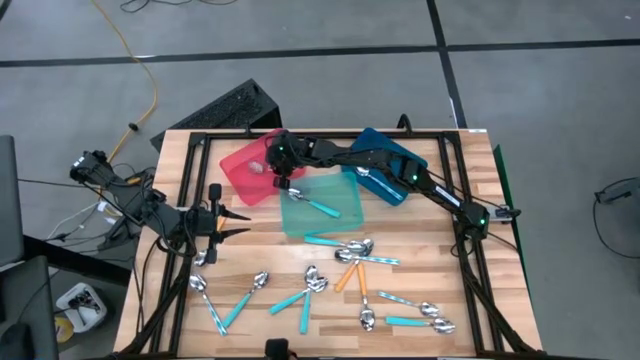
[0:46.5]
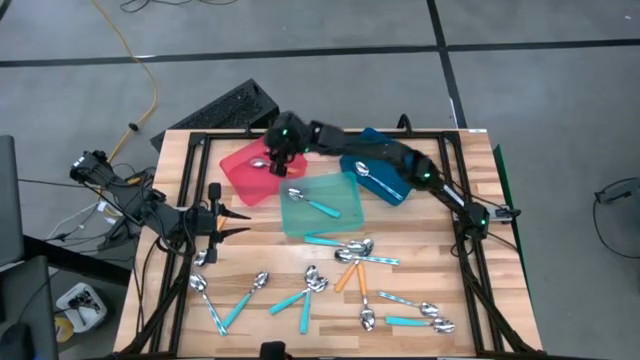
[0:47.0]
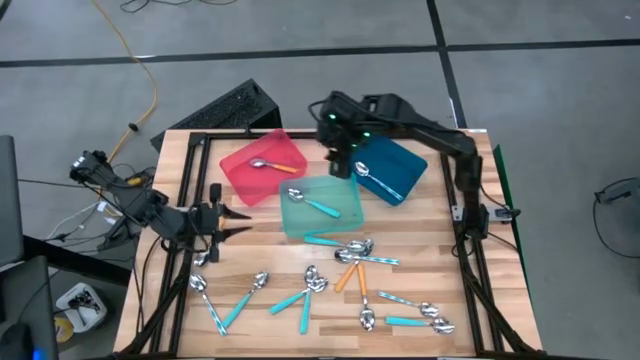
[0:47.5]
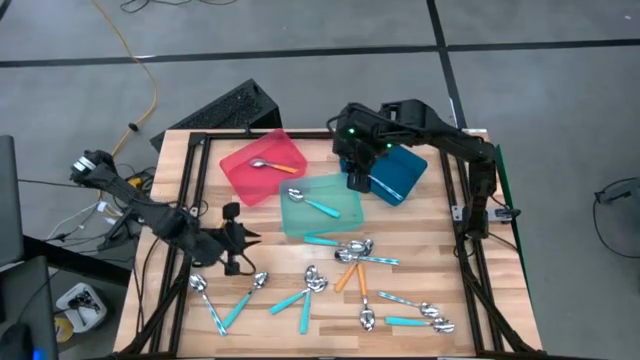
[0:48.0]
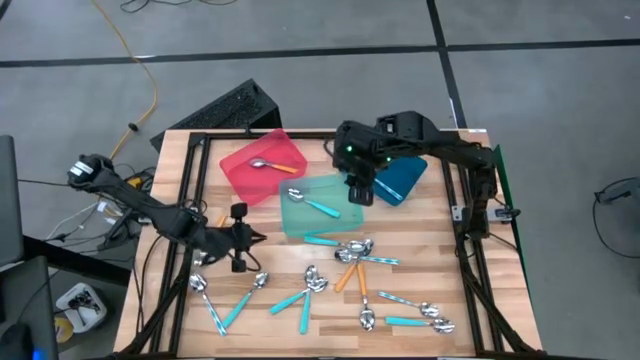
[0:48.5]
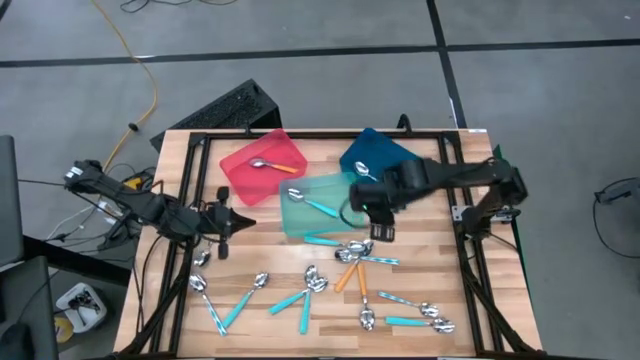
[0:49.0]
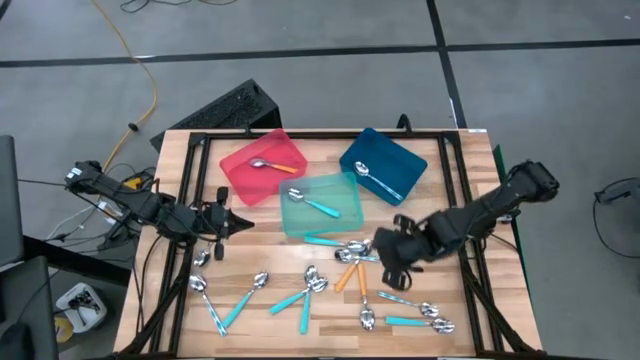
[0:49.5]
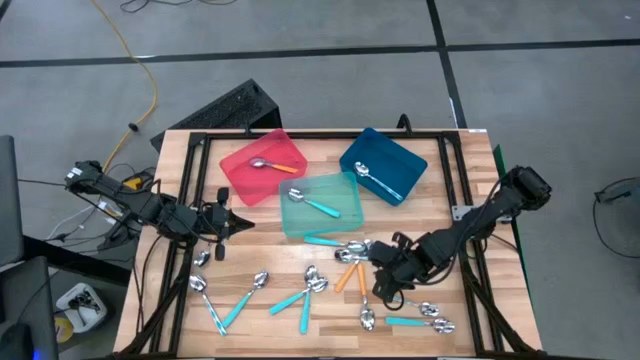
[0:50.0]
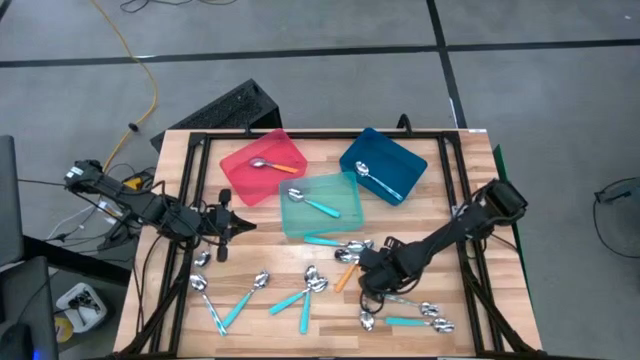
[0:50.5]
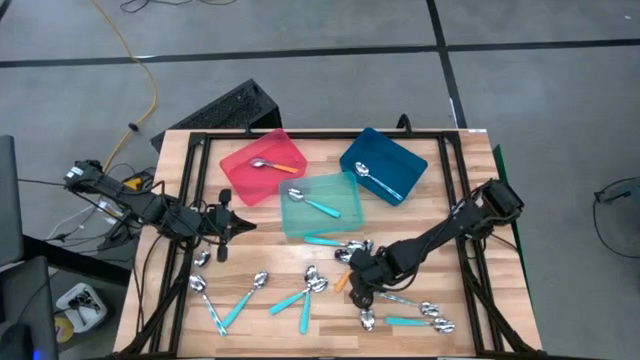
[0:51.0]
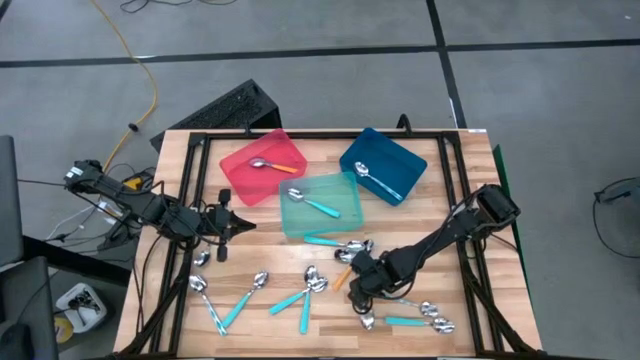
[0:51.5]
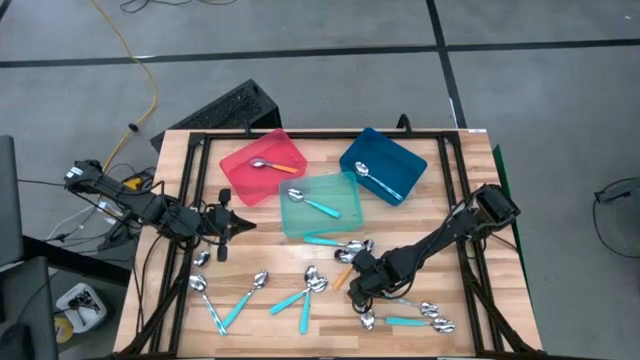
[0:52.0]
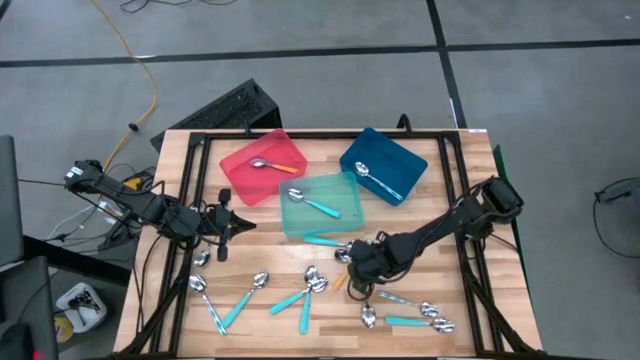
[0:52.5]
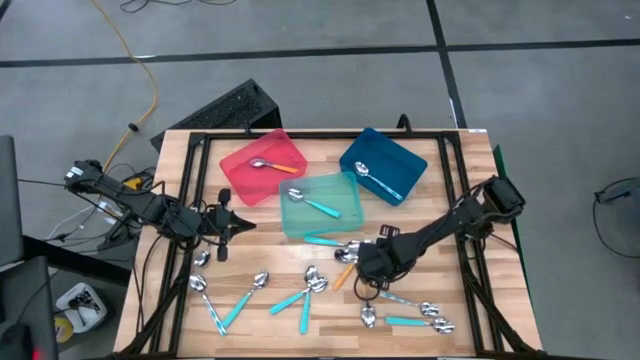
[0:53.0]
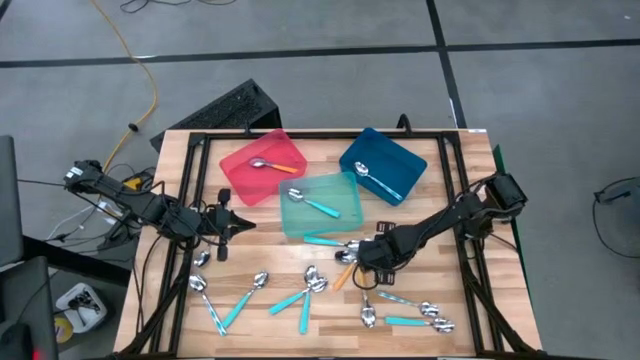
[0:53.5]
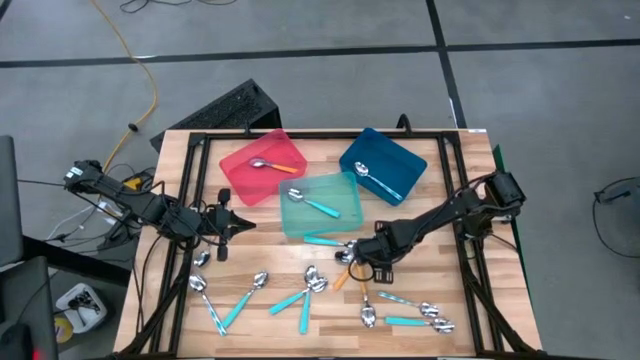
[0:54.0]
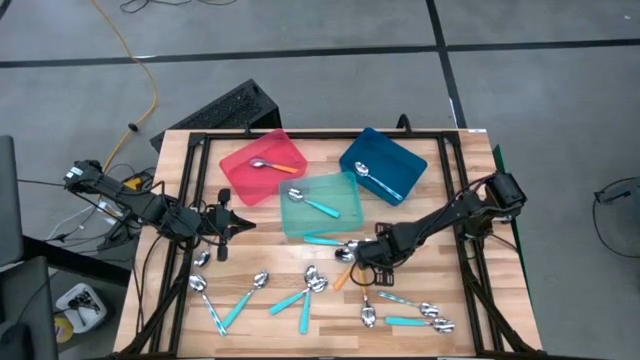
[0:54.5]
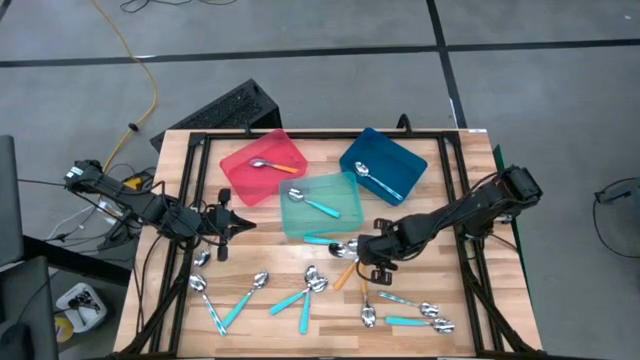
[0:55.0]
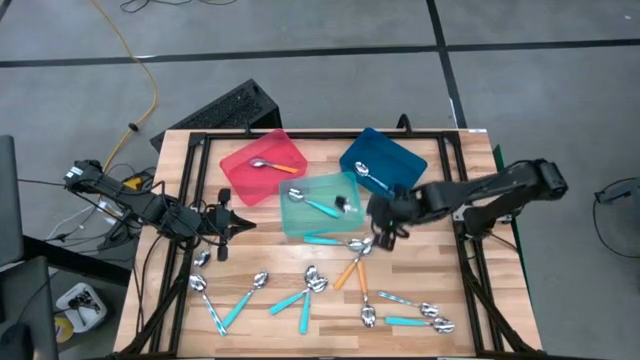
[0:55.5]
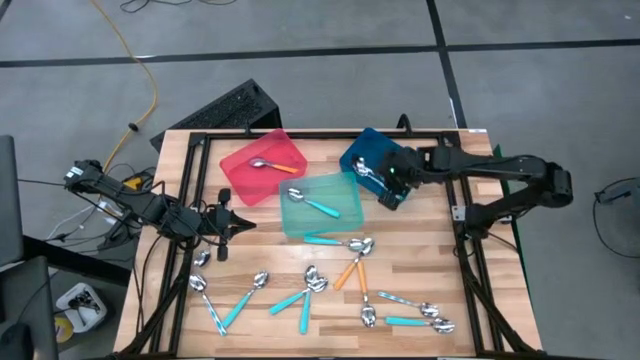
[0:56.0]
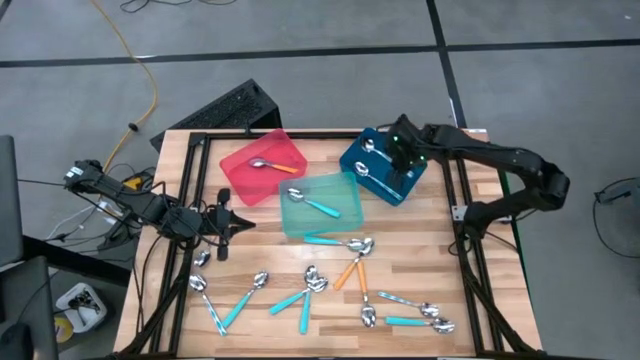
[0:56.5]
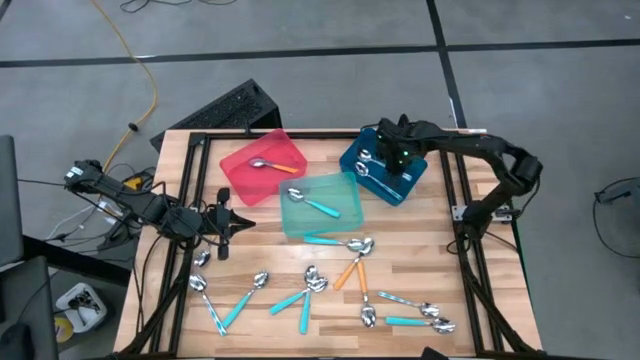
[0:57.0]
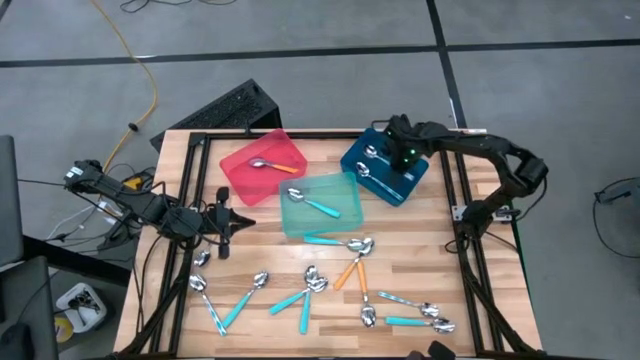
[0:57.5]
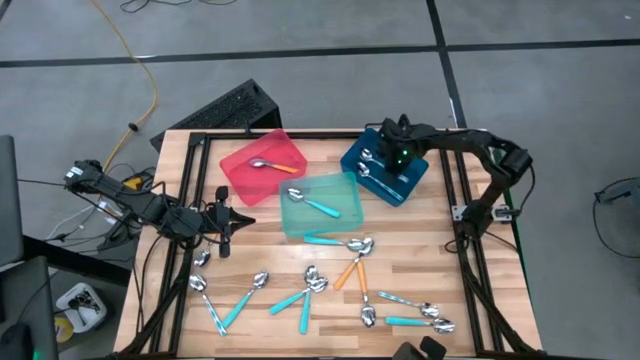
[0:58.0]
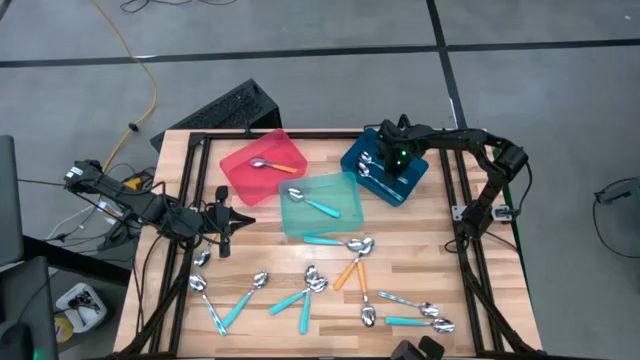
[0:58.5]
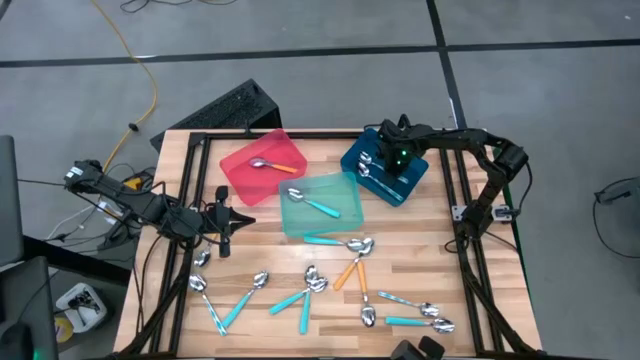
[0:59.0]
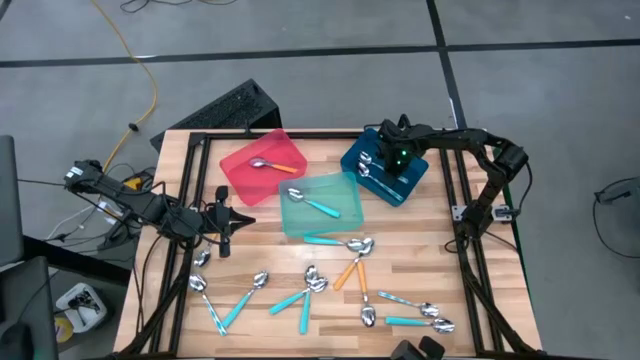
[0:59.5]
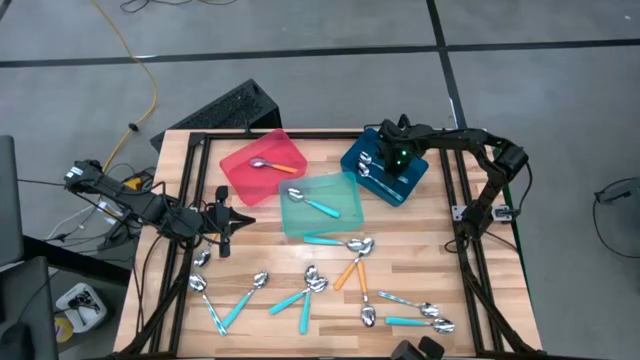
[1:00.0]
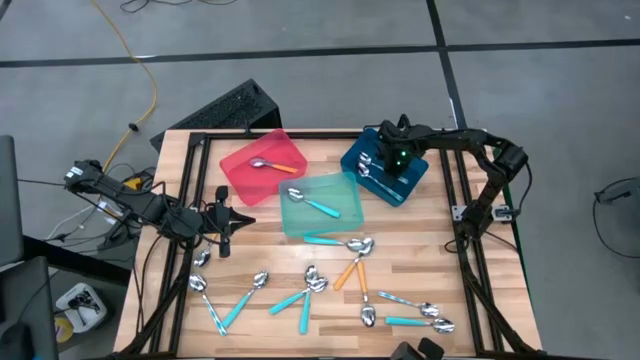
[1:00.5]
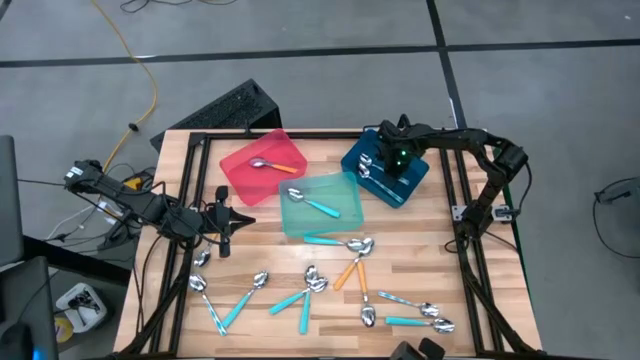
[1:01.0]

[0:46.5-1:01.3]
Task: Sort silverware by color (type)
Put the top patterned blue spoon into the blue bin
